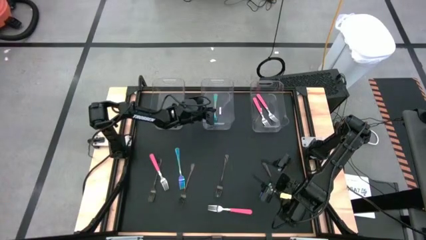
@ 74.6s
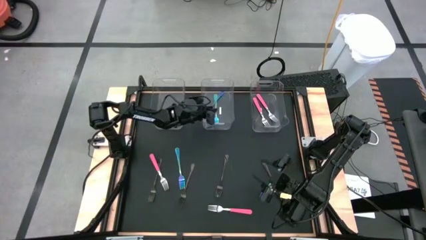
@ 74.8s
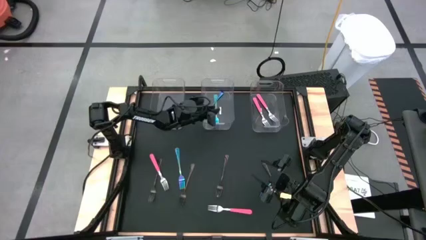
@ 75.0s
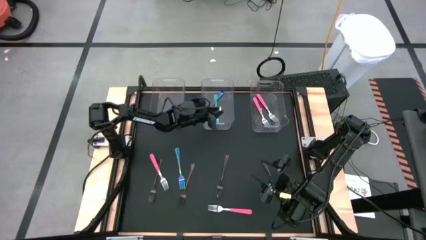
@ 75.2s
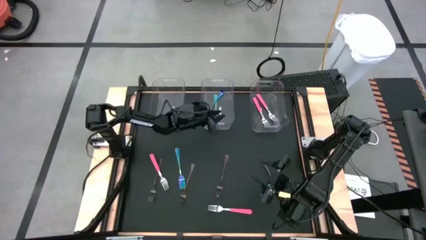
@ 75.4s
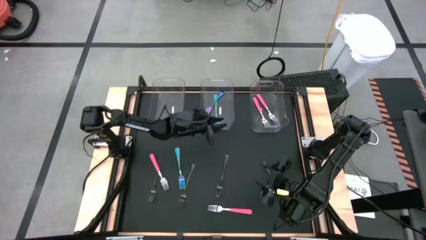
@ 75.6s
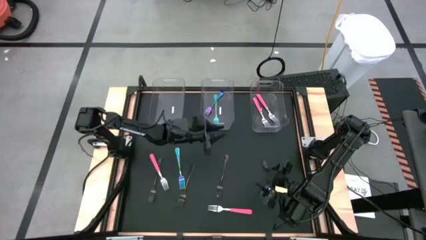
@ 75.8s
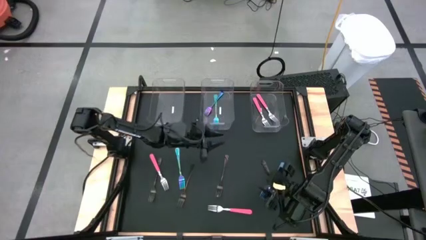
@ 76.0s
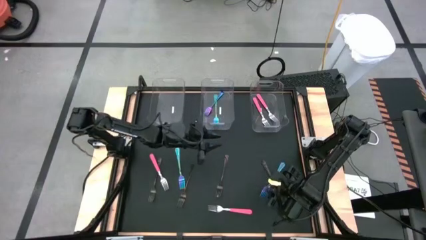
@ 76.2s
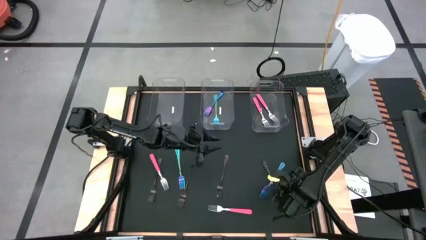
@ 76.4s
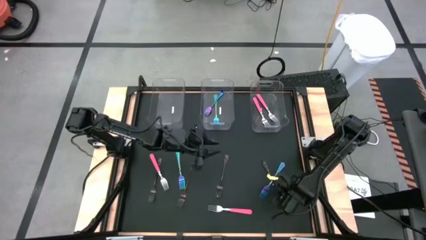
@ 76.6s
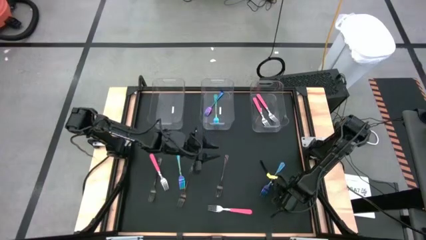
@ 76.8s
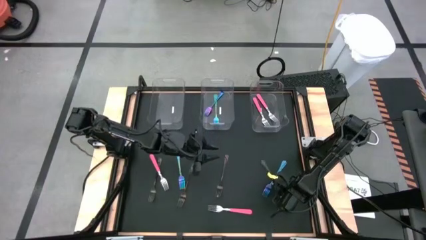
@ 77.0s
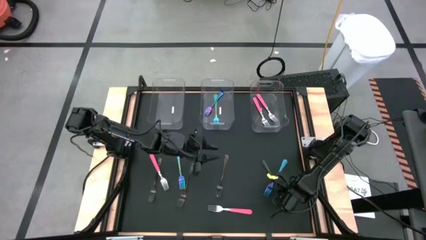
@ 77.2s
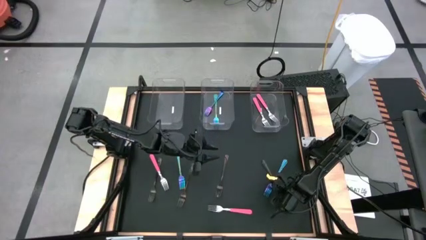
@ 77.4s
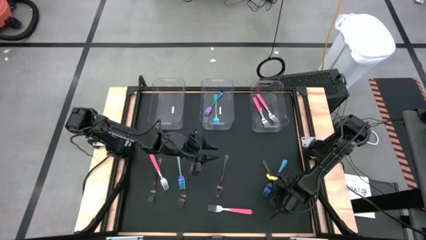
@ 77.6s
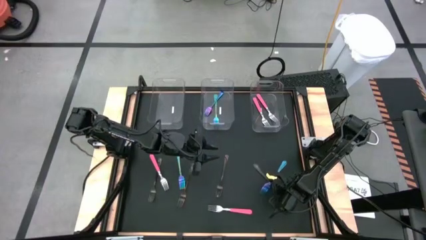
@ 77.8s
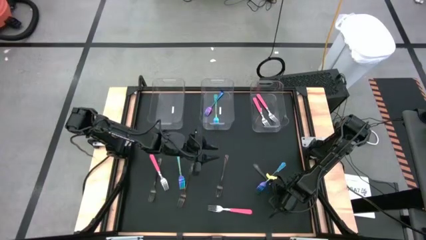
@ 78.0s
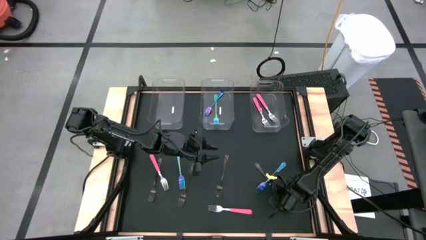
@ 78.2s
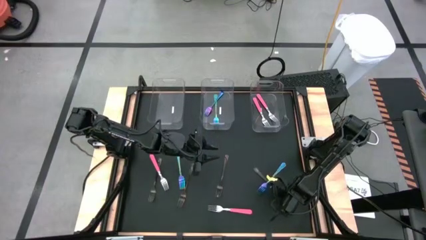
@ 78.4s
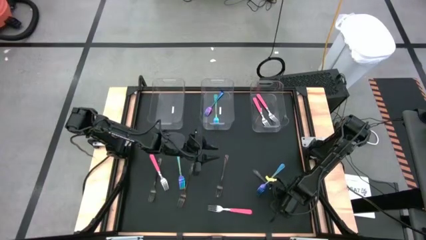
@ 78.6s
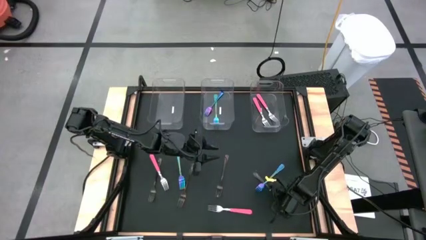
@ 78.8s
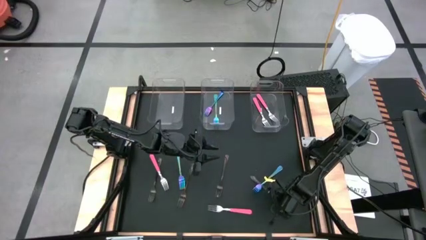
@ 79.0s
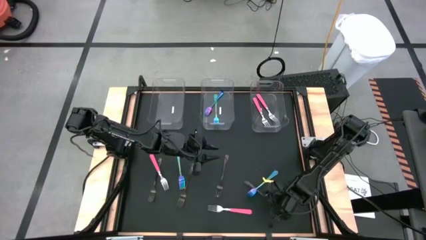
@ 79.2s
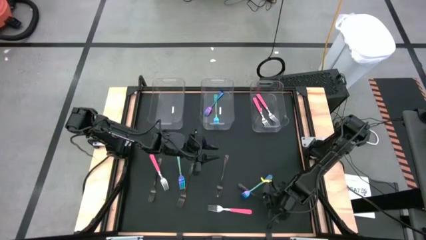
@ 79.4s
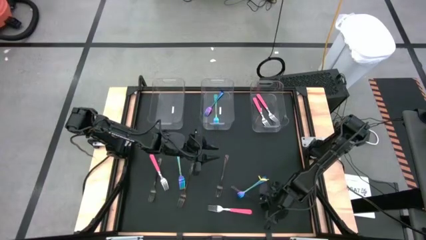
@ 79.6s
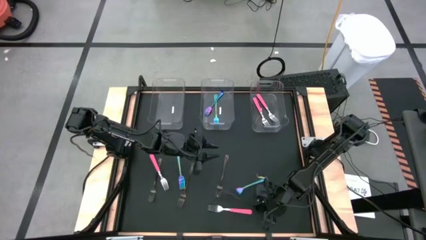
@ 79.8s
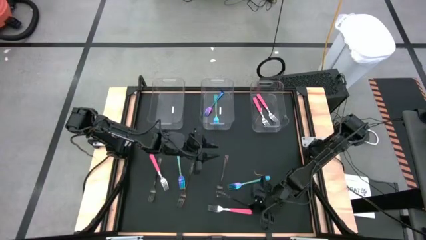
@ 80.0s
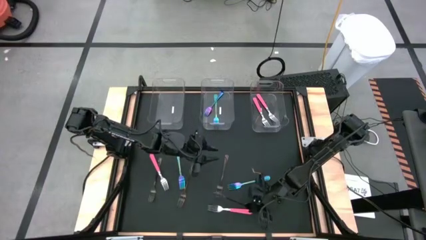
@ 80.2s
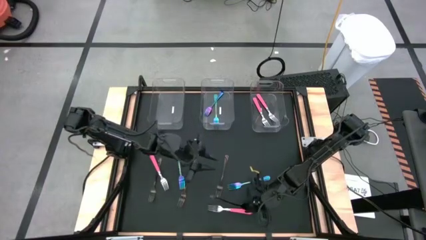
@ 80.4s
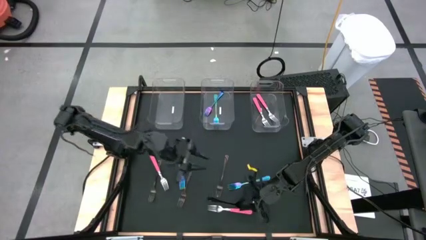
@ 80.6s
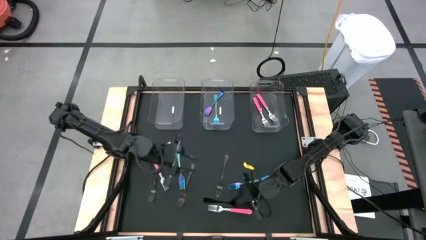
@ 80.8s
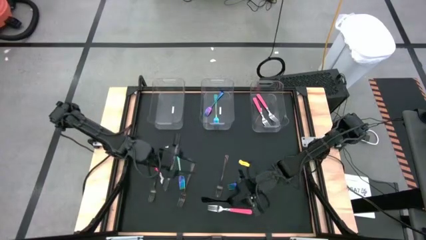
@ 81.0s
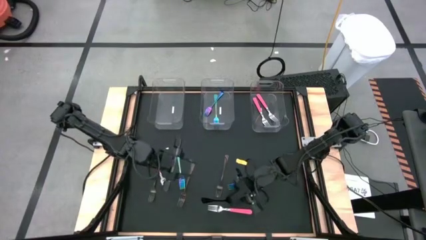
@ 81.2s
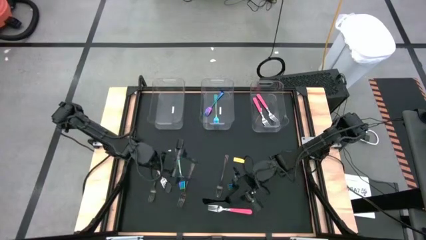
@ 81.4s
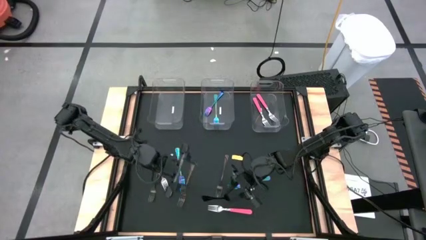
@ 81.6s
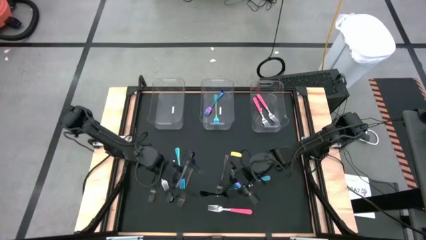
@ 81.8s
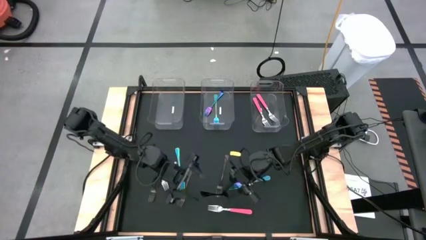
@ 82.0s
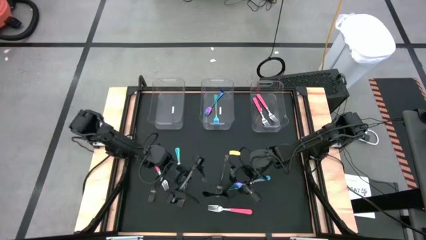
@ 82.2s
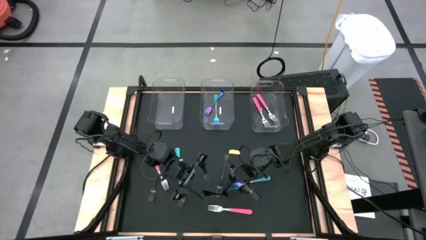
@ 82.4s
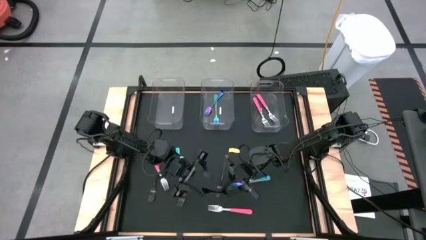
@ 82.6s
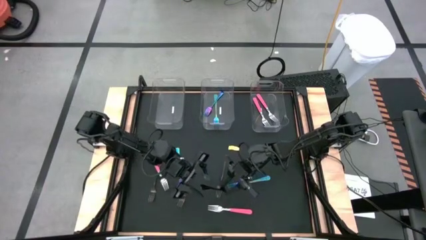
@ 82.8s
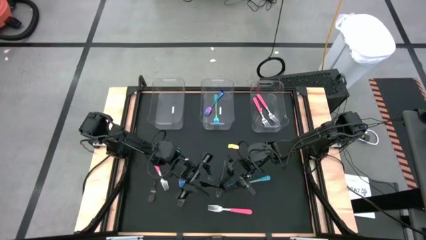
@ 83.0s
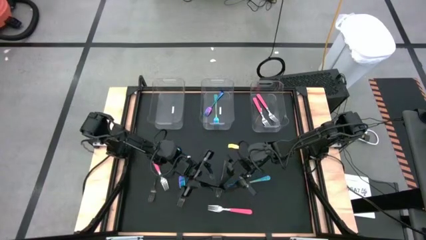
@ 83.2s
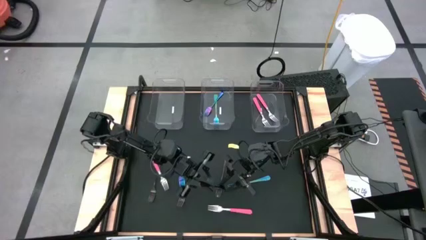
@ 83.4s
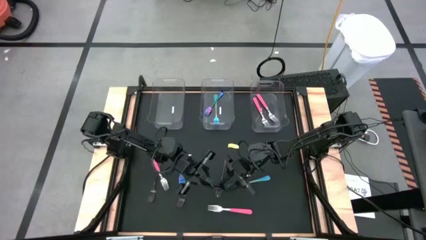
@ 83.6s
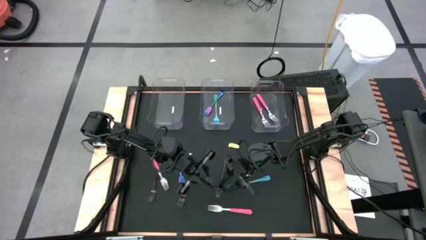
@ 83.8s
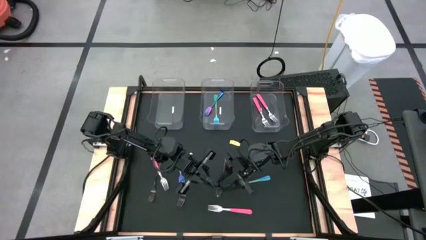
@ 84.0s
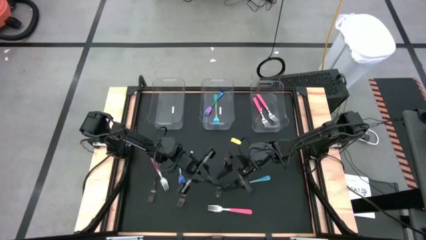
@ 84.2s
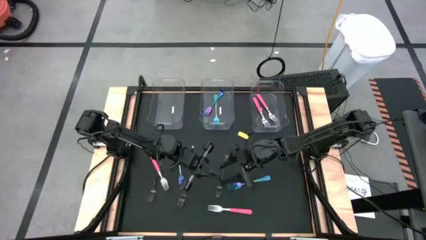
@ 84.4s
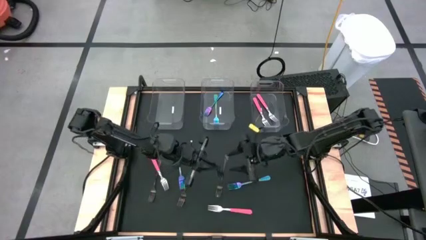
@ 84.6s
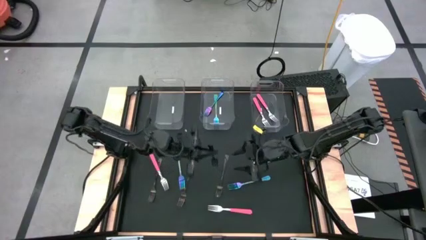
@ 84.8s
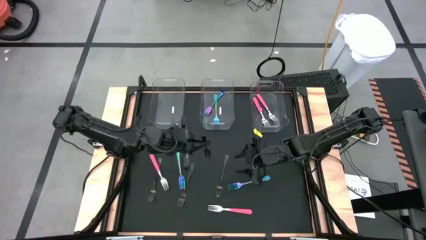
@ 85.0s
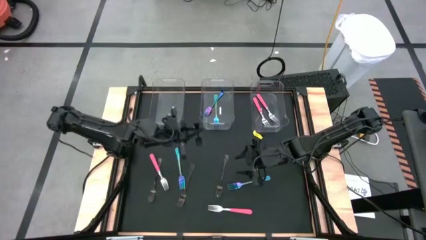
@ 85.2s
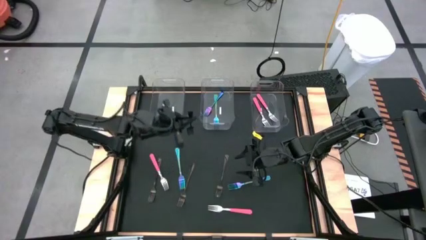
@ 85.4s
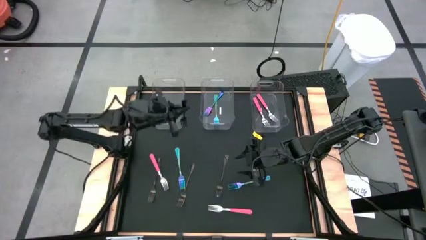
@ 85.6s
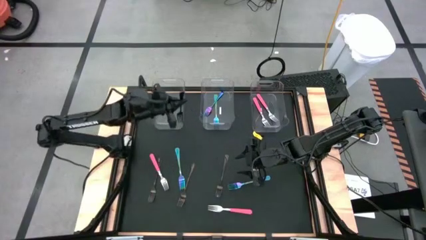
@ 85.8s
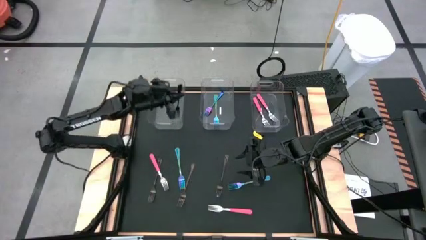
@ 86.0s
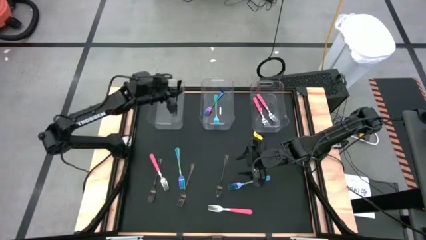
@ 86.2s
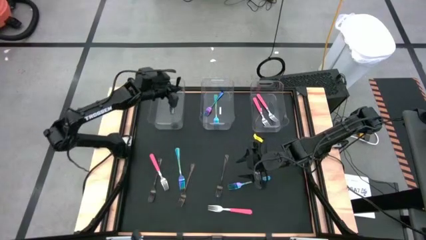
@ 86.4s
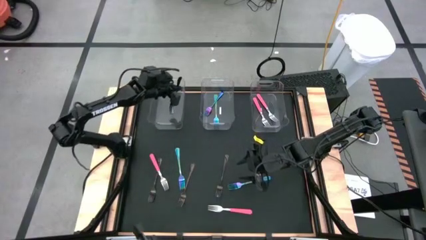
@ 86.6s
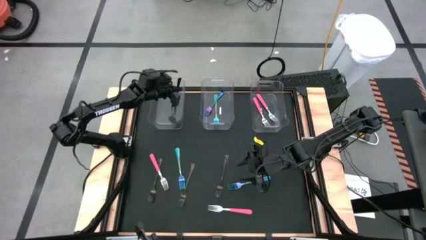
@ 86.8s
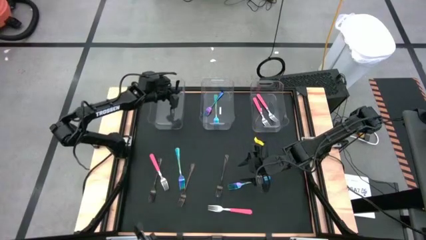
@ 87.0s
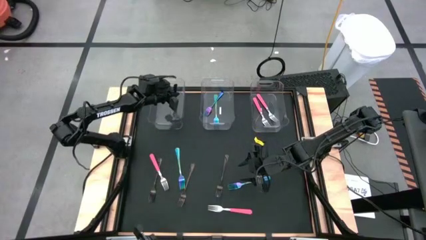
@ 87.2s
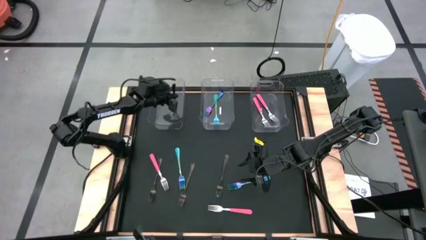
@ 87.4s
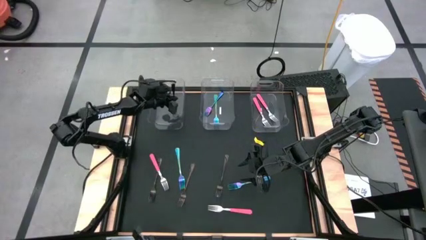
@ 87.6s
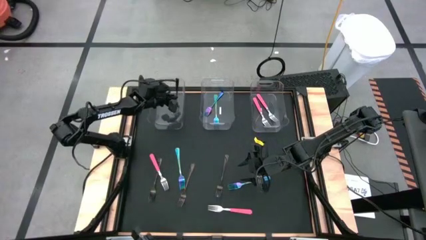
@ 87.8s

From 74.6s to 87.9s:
Task: Sort silverware by color (type)
Put the black fork into the left transparent bin

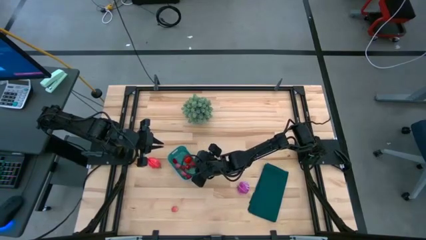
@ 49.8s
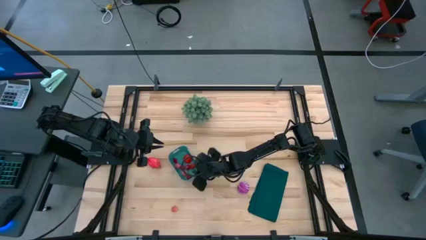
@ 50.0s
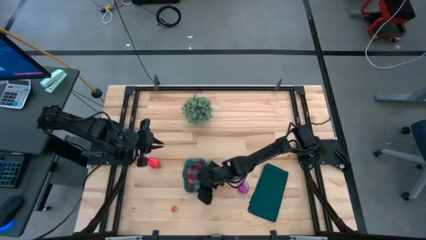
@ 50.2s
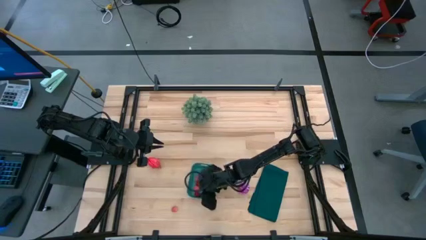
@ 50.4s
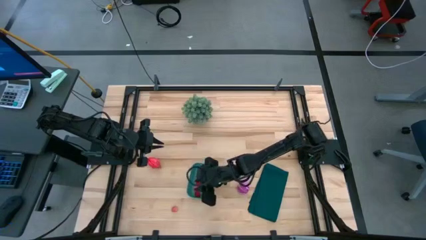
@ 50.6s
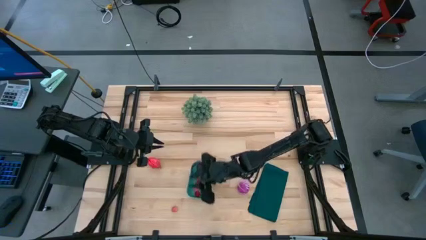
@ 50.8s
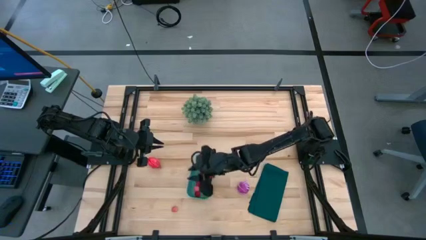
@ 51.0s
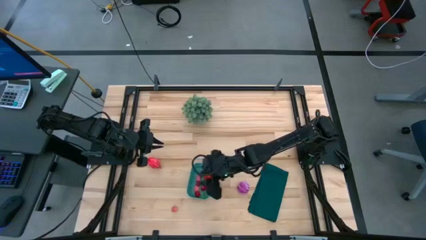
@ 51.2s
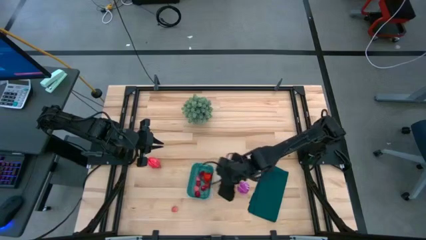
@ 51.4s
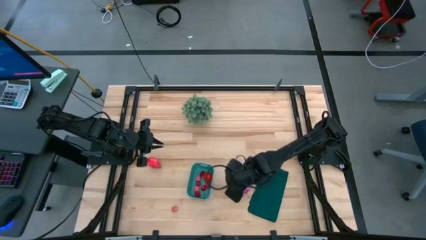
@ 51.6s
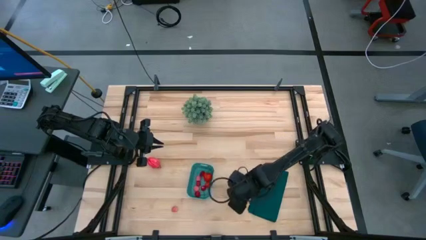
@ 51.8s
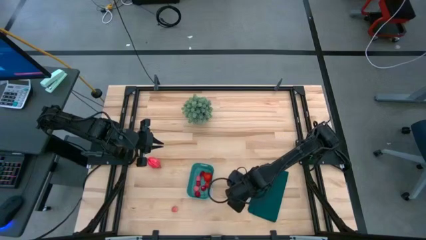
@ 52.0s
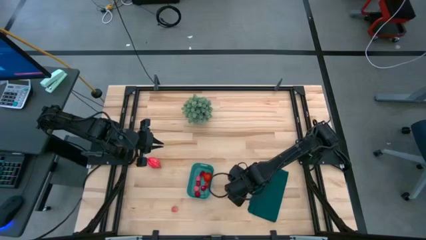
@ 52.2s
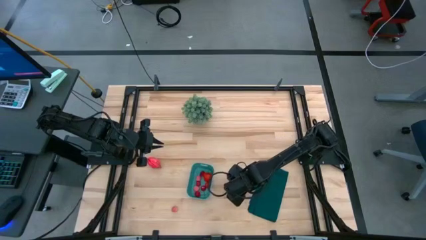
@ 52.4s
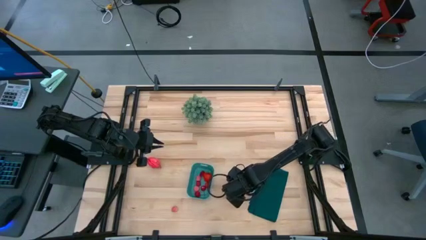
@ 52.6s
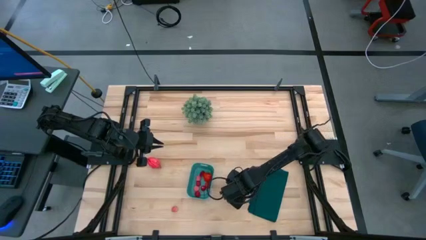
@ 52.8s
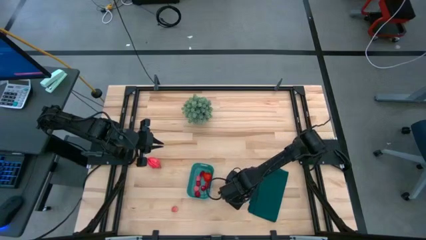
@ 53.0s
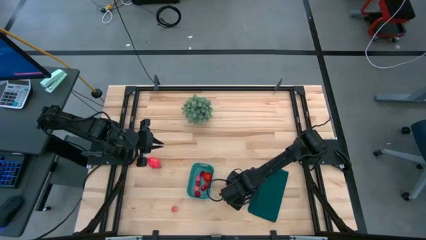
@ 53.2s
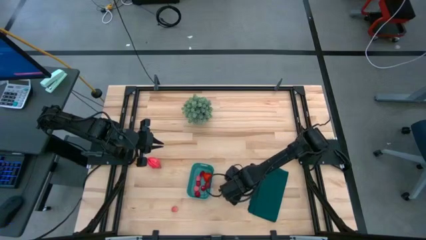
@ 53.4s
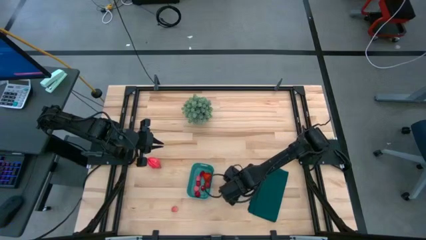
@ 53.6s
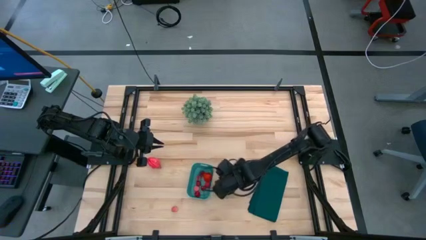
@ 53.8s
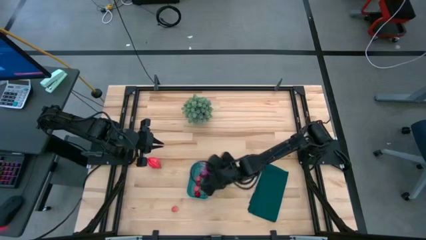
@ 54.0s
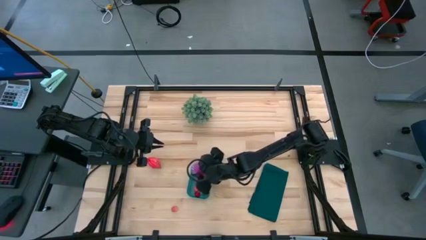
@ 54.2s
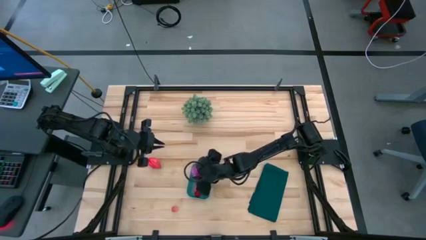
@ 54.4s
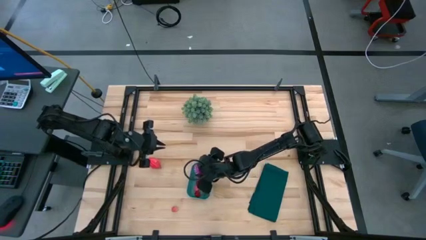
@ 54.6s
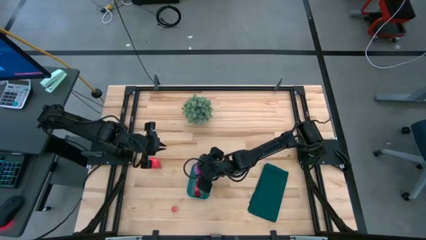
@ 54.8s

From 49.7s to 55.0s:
Task: Pick and placing Produce into tupperware
Put the purple onion into the green bin
